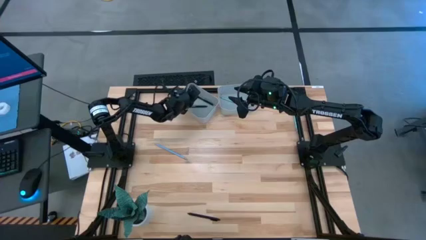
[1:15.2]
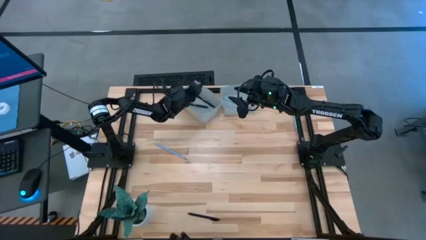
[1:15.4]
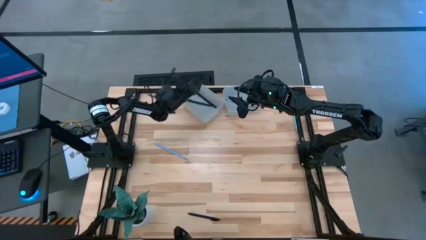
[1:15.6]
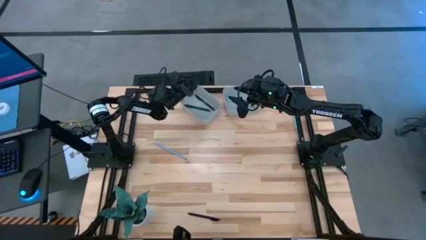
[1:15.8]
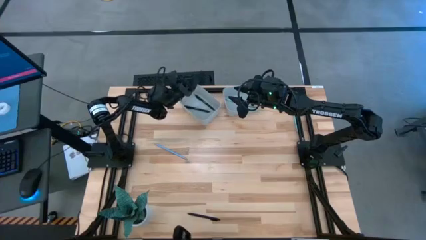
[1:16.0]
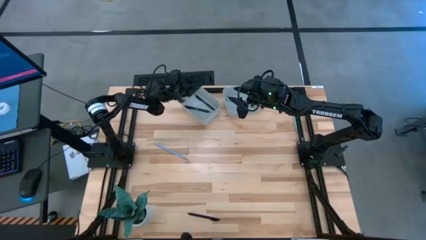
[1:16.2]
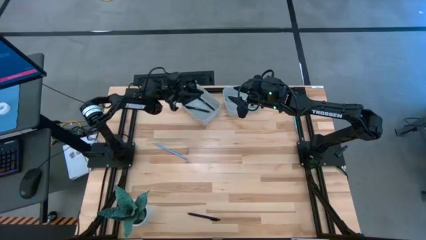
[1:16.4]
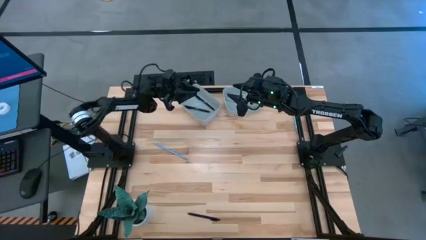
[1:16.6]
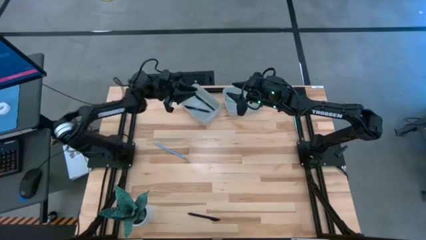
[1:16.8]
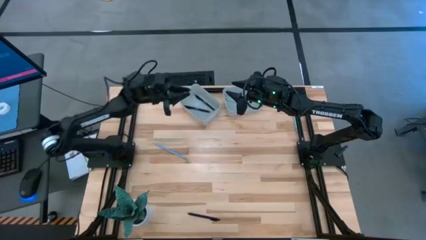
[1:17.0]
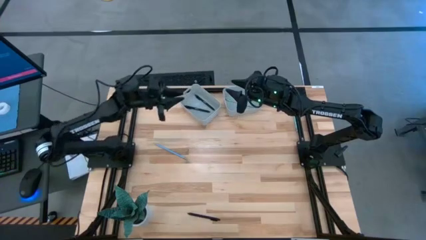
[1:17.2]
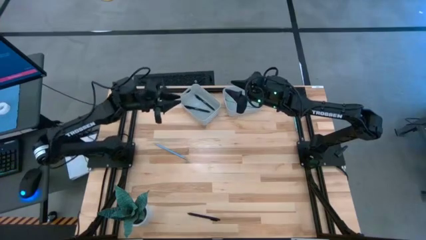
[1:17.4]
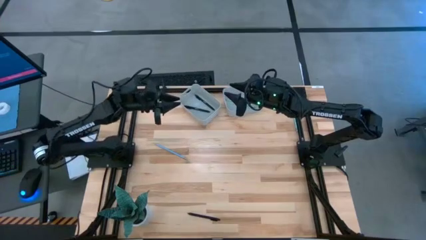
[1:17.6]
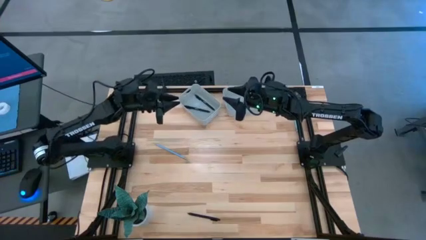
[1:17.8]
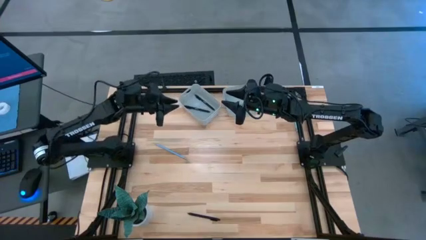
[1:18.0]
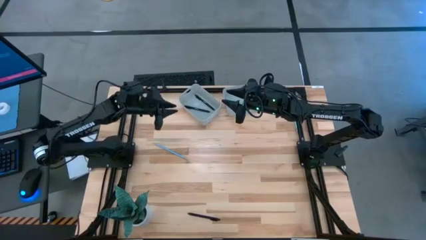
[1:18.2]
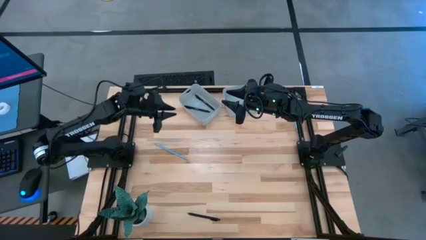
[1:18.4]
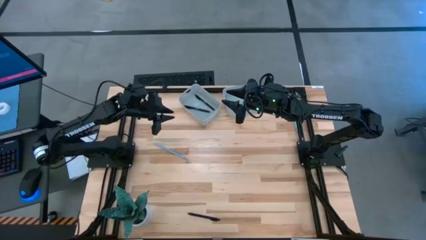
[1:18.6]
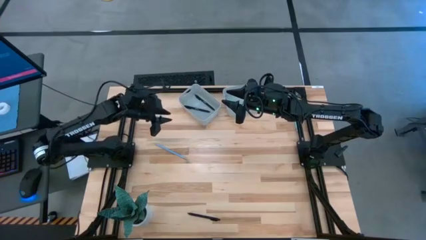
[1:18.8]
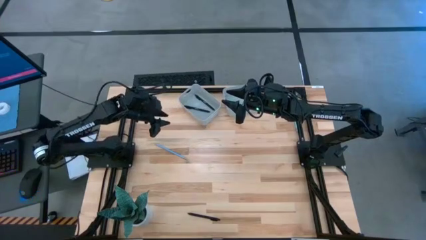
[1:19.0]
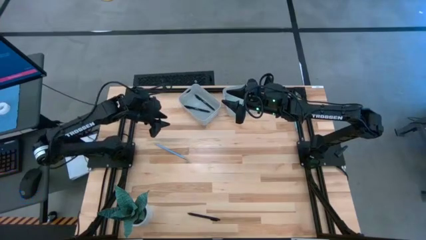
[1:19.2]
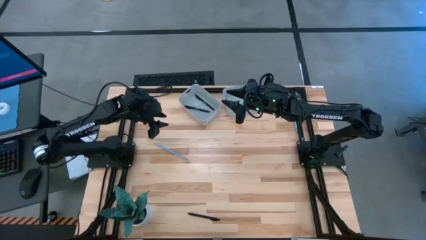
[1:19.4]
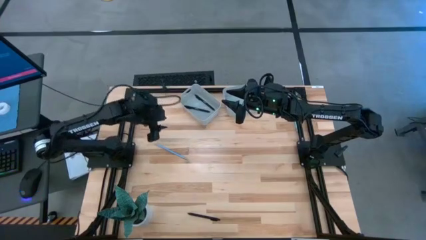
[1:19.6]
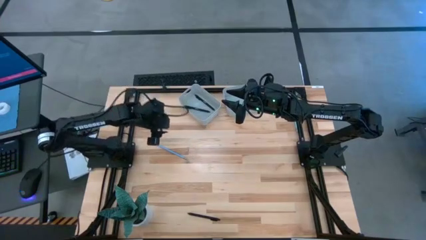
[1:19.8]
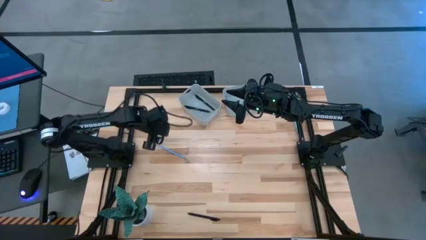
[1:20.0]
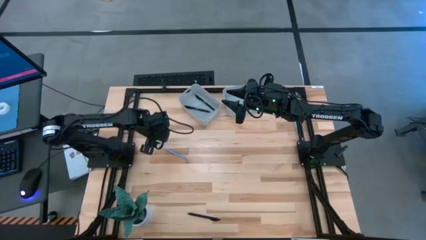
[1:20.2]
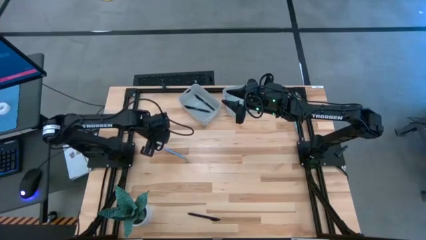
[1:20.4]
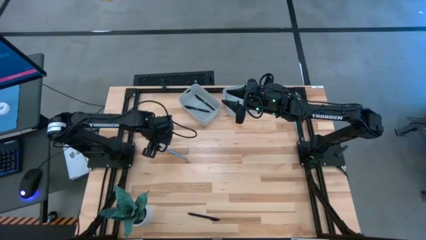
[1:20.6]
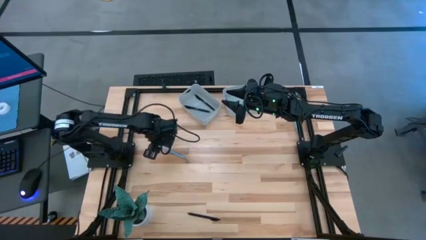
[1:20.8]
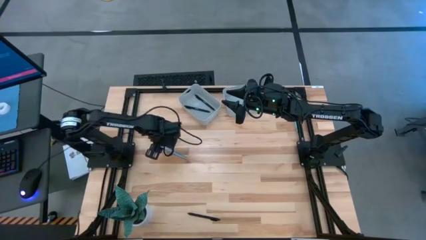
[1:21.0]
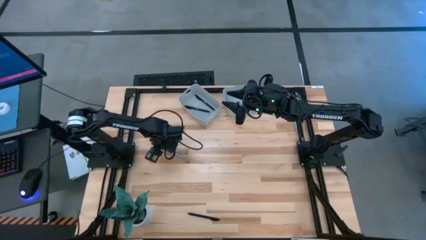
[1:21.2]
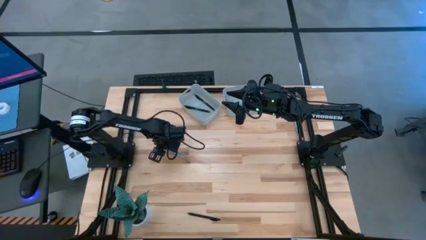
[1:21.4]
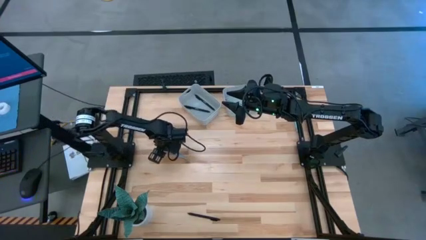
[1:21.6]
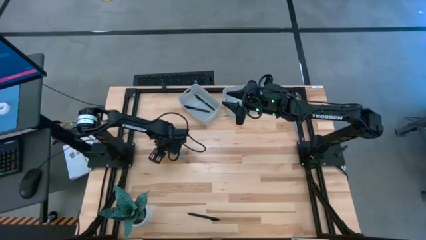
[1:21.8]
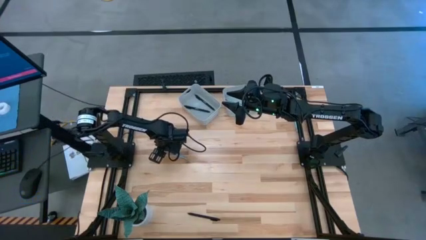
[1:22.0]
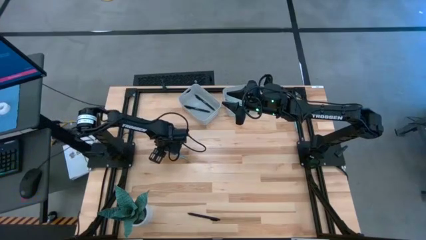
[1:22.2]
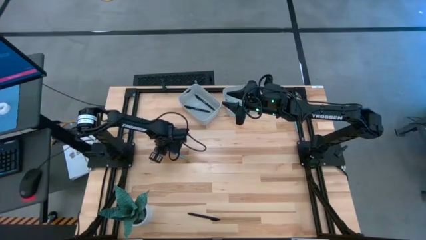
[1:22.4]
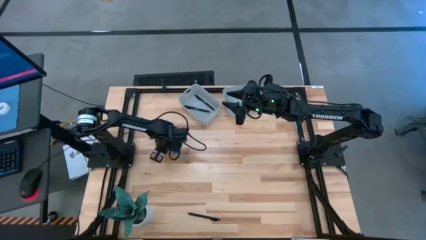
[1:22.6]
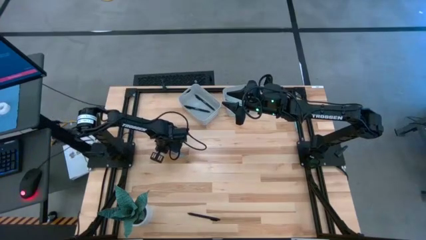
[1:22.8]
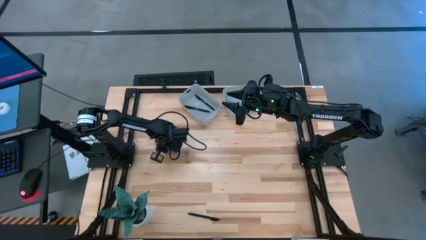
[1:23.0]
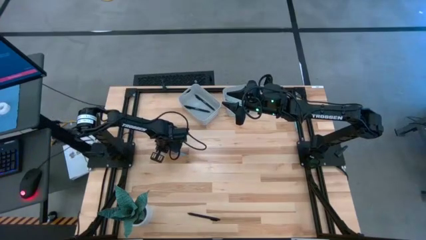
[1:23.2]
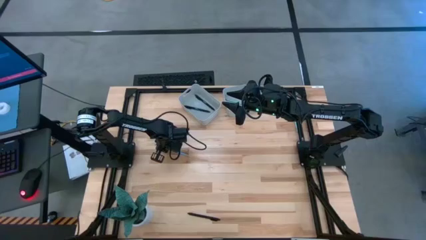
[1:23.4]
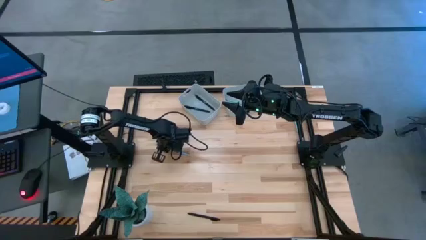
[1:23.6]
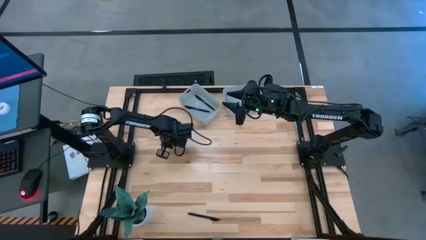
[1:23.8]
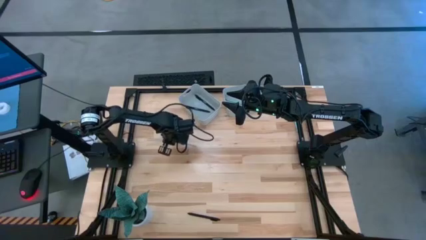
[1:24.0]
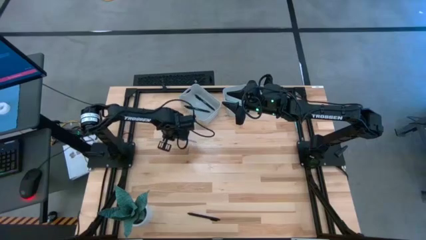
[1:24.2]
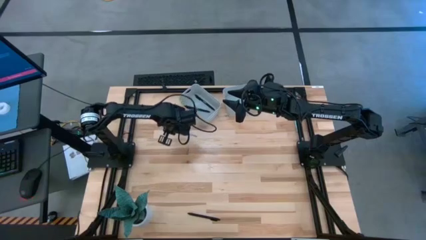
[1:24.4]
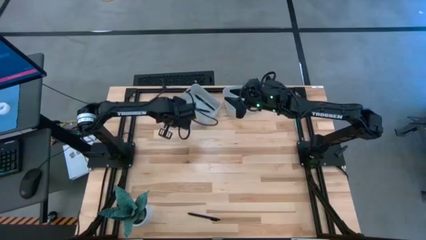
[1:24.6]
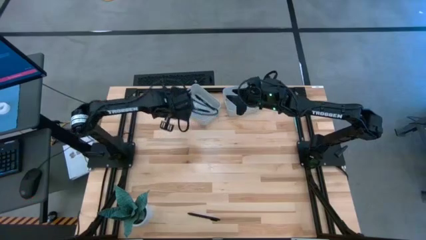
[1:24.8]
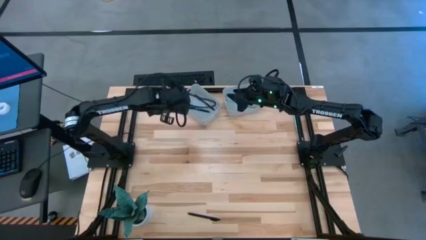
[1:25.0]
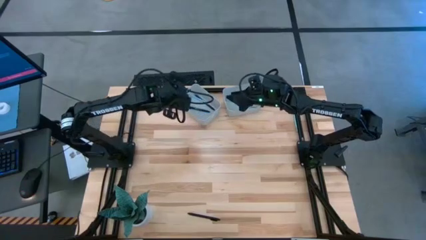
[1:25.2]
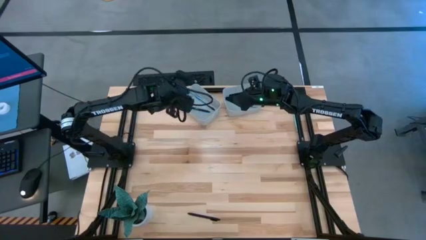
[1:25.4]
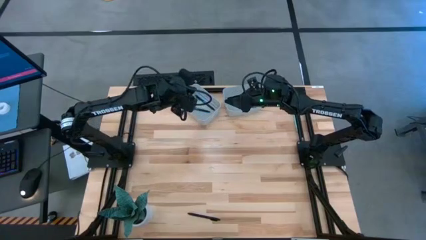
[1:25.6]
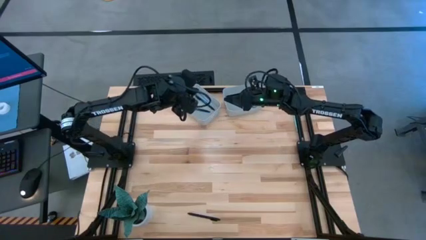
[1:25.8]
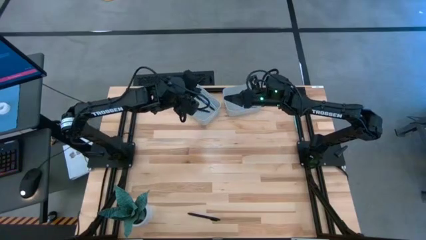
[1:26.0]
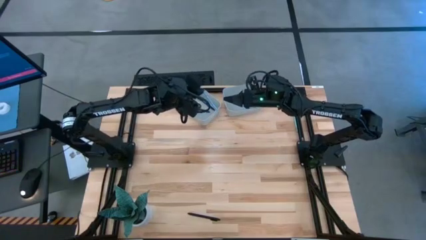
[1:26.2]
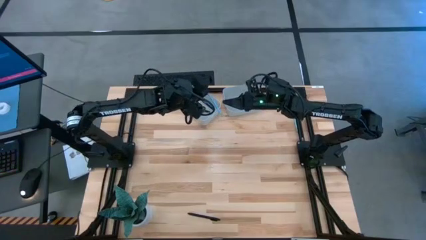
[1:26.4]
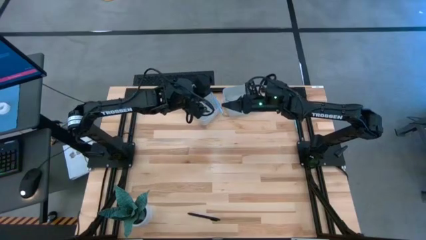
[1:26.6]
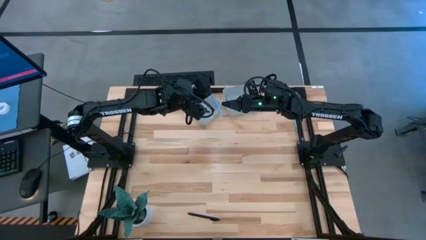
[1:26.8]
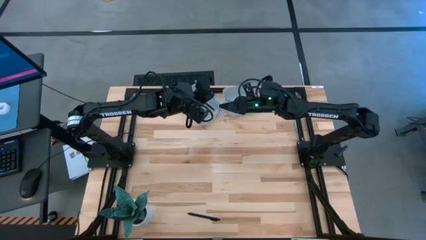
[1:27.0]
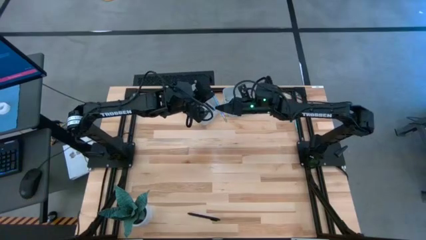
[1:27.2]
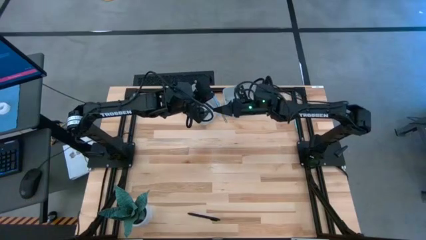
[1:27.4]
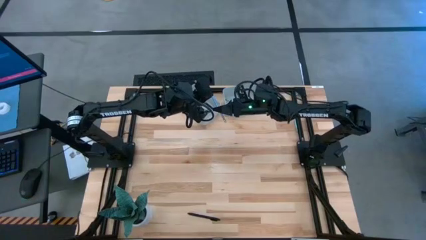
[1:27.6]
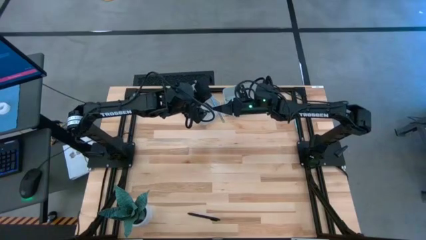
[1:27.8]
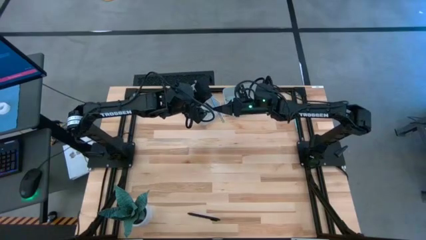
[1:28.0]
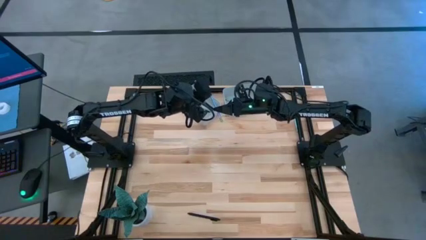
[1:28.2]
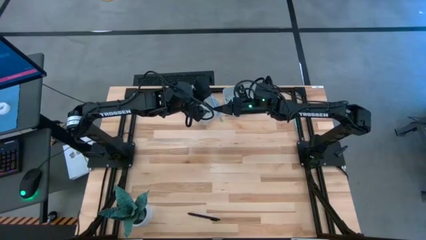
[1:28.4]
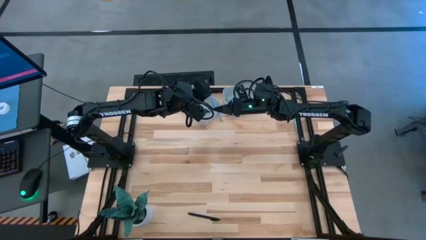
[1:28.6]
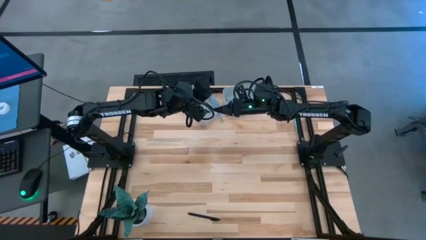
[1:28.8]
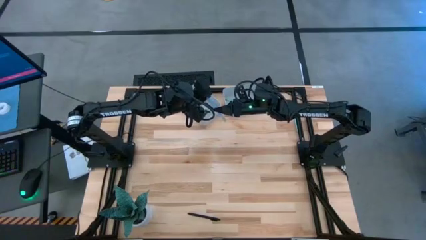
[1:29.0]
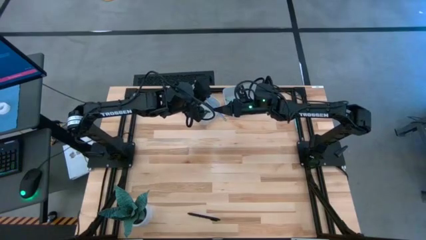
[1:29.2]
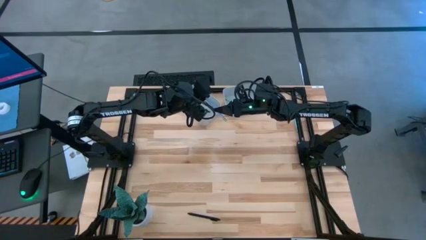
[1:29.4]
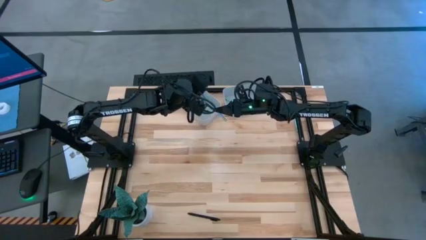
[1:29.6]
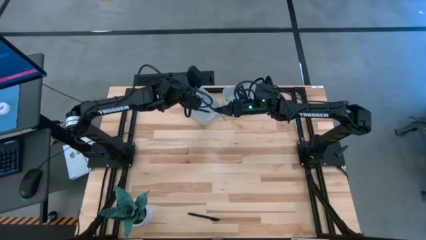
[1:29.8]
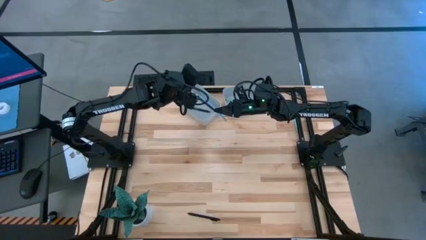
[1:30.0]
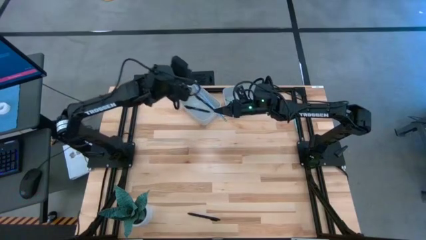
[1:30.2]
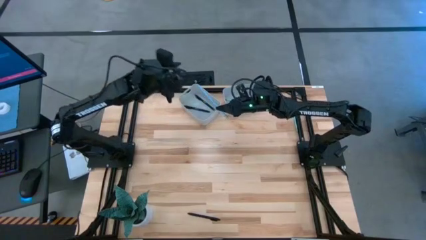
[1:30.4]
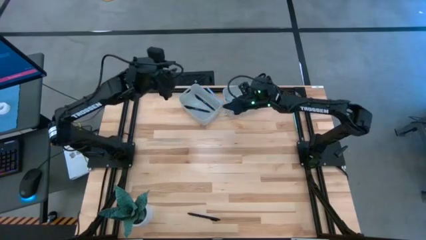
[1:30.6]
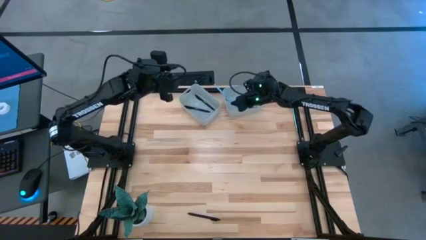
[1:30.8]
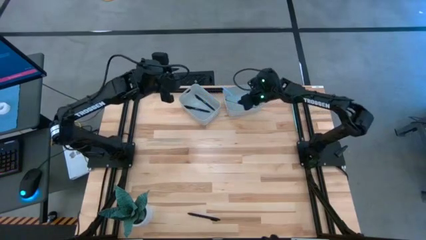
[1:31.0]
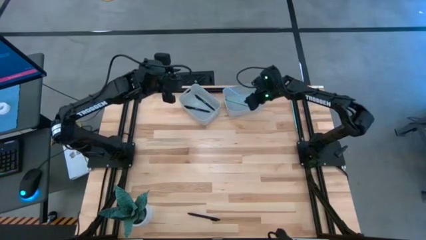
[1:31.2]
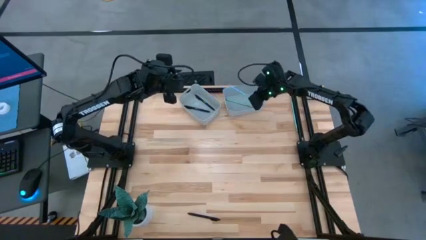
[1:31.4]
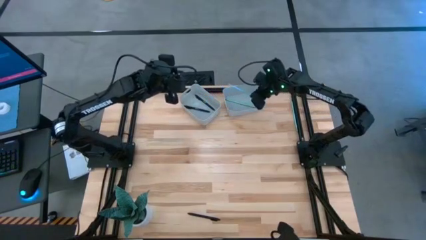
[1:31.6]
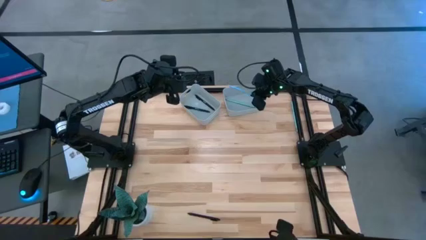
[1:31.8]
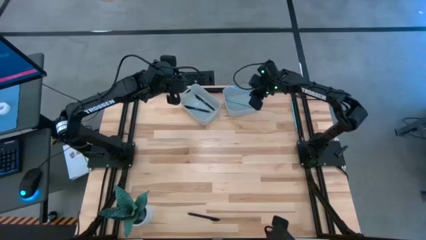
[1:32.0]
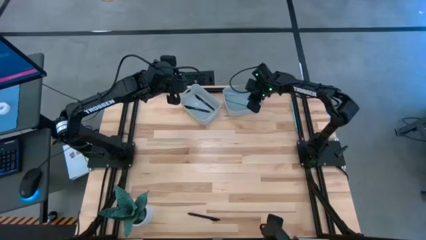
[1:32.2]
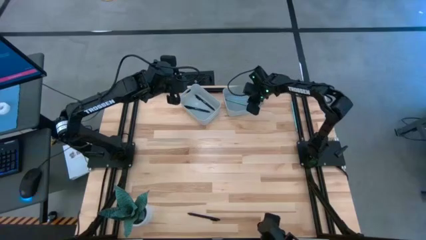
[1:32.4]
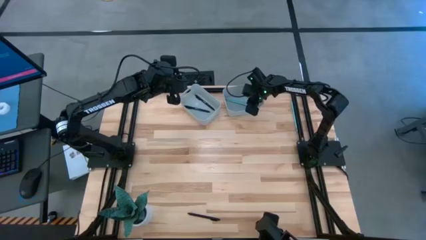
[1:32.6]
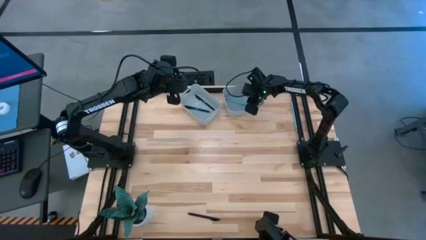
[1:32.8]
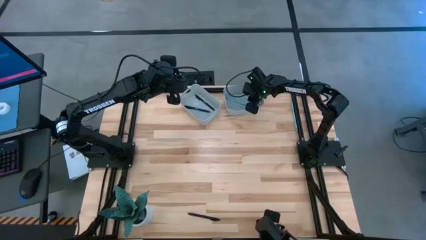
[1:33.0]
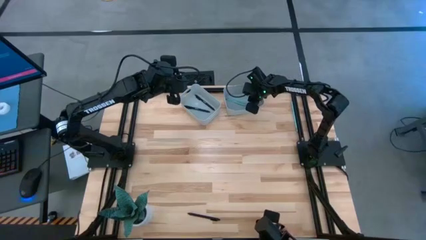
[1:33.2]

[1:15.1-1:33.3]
Task: Sort pens & pencils
Put the light blue pencil into the right gray bin
